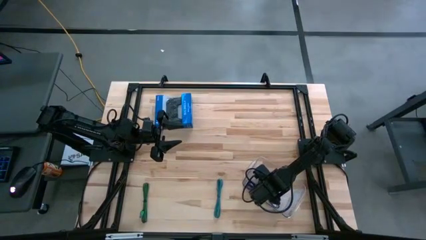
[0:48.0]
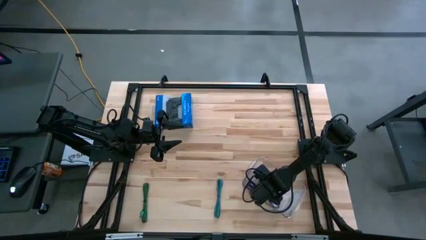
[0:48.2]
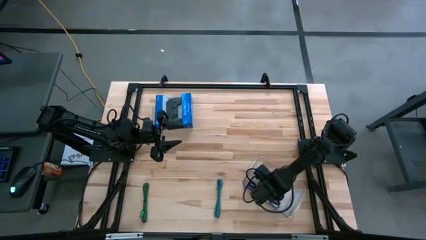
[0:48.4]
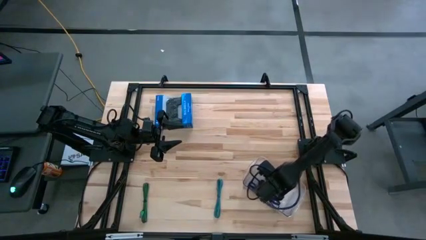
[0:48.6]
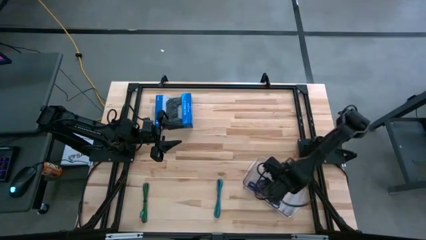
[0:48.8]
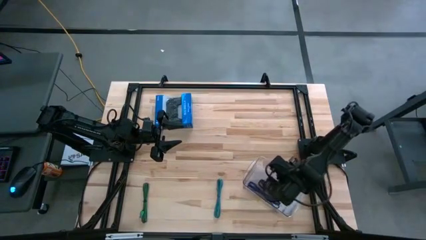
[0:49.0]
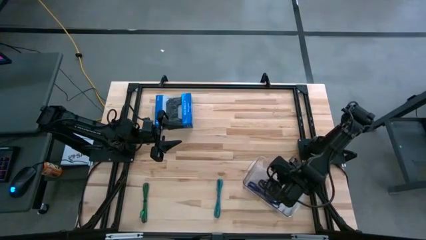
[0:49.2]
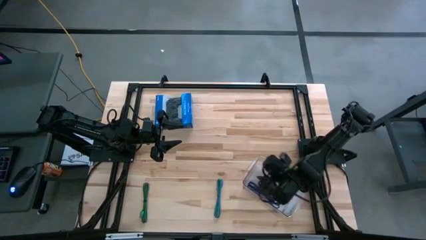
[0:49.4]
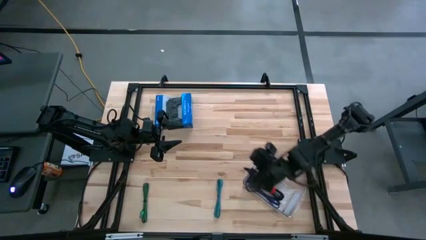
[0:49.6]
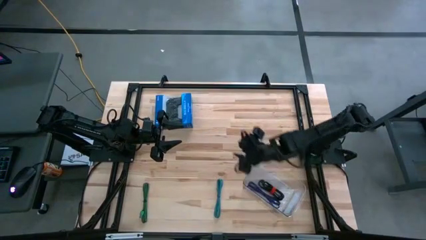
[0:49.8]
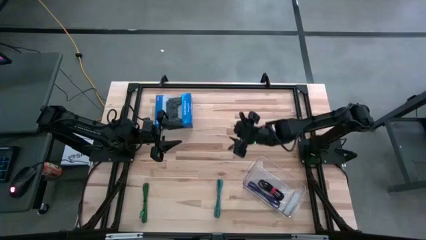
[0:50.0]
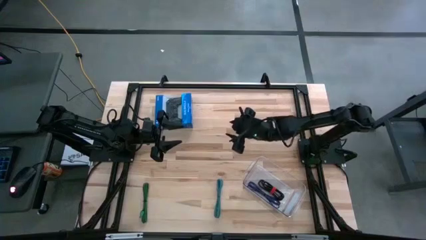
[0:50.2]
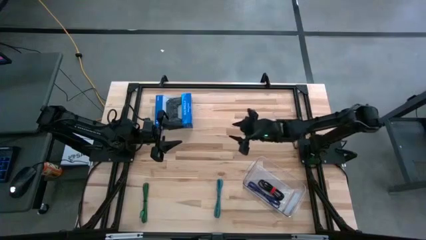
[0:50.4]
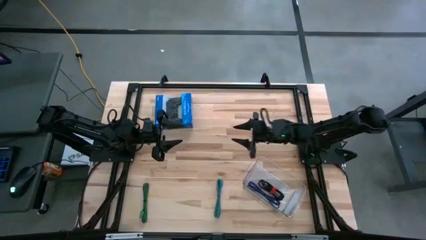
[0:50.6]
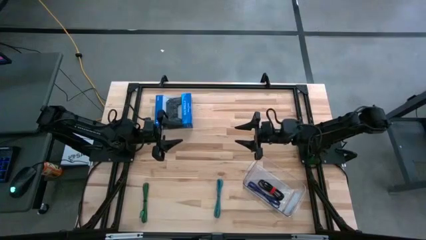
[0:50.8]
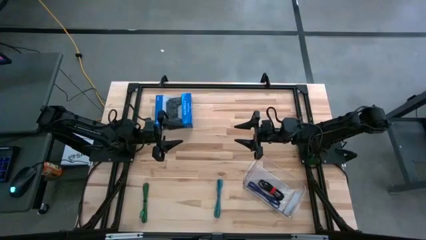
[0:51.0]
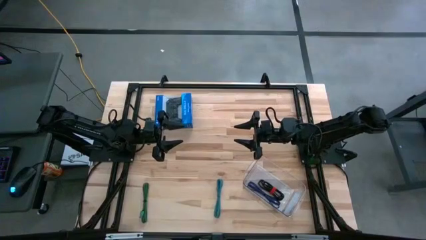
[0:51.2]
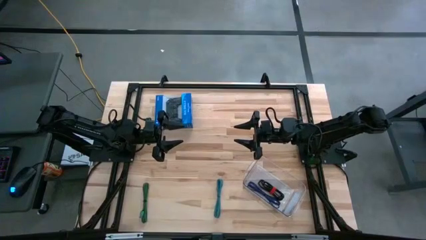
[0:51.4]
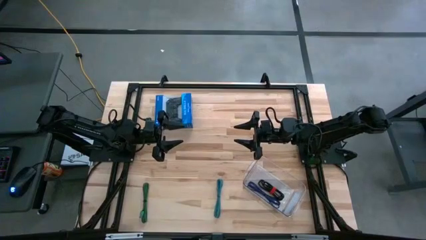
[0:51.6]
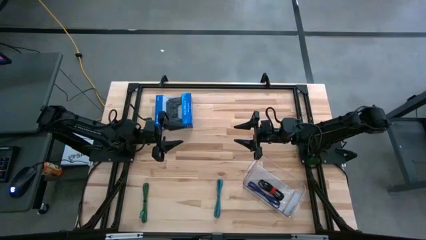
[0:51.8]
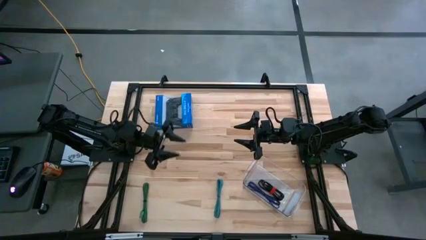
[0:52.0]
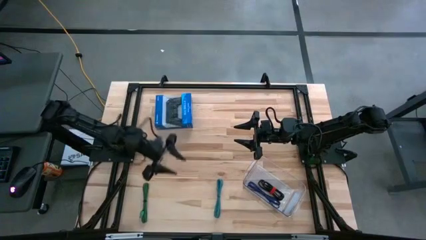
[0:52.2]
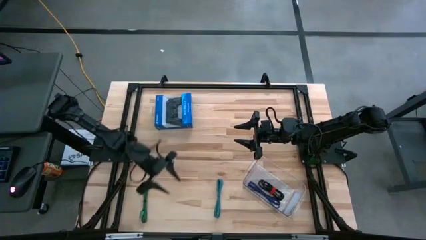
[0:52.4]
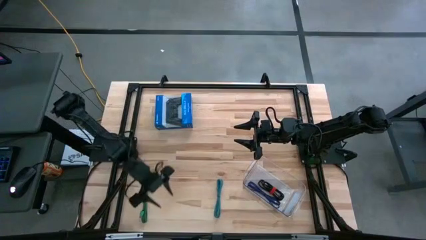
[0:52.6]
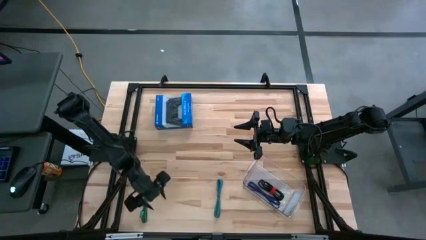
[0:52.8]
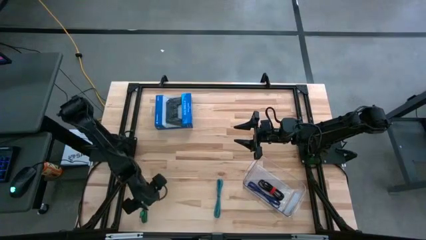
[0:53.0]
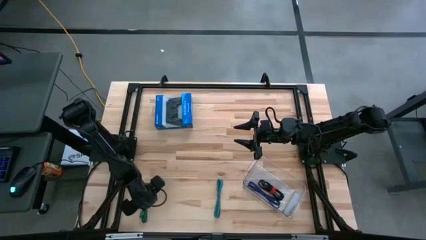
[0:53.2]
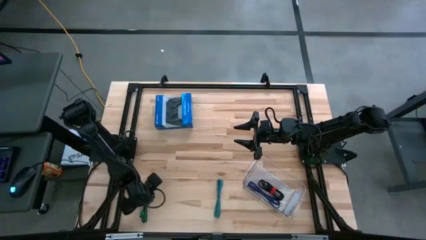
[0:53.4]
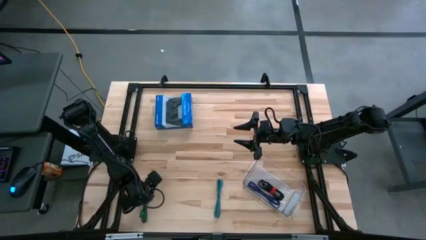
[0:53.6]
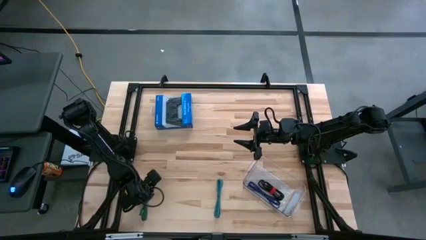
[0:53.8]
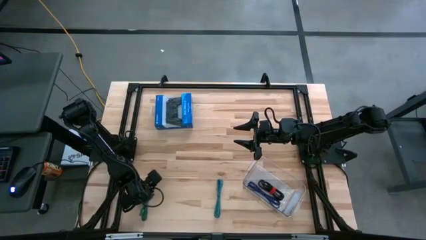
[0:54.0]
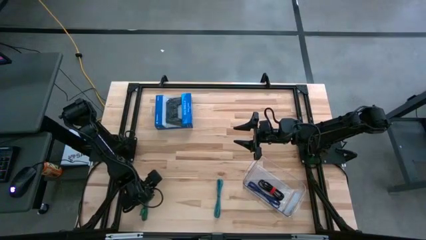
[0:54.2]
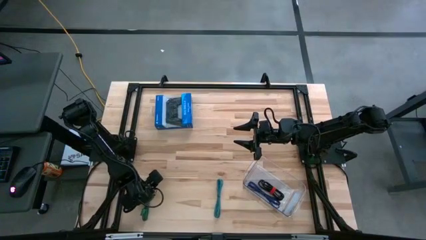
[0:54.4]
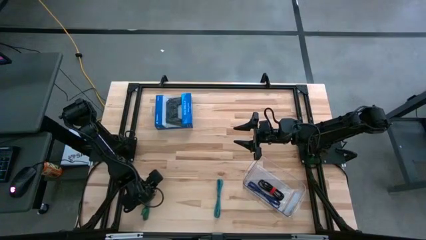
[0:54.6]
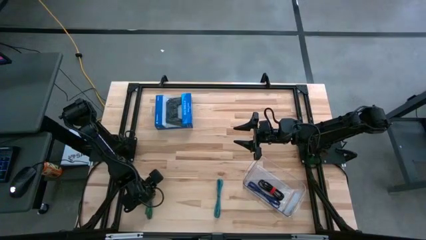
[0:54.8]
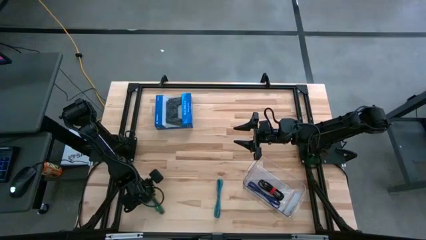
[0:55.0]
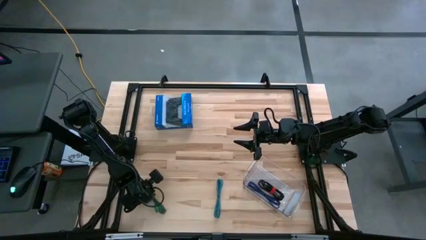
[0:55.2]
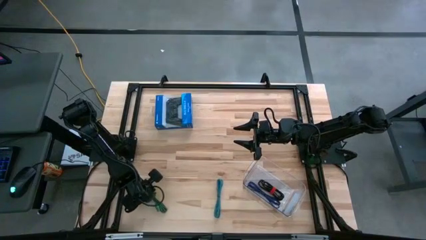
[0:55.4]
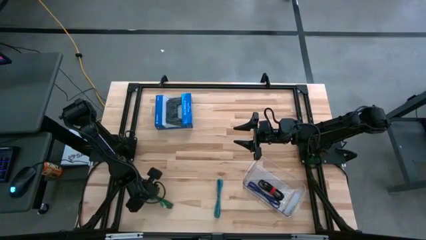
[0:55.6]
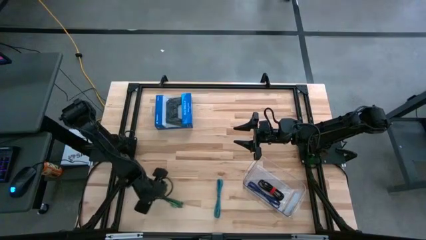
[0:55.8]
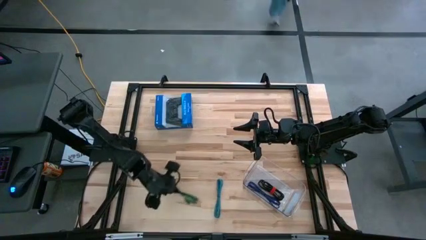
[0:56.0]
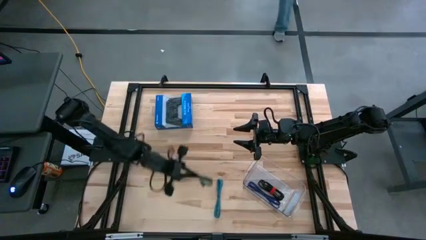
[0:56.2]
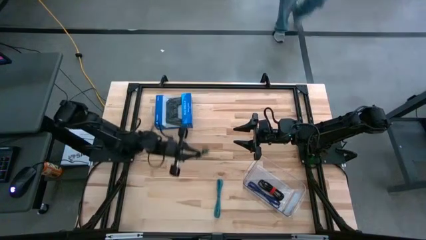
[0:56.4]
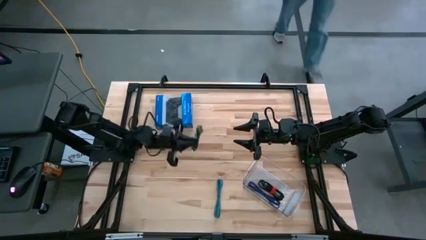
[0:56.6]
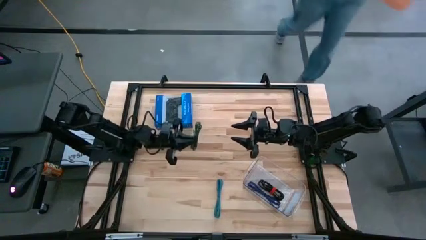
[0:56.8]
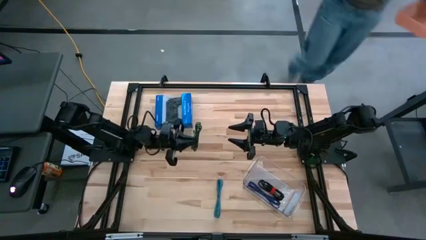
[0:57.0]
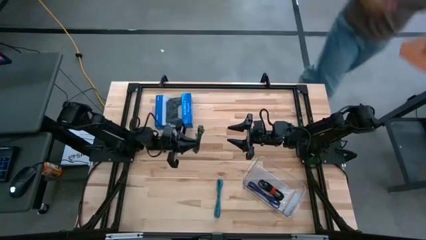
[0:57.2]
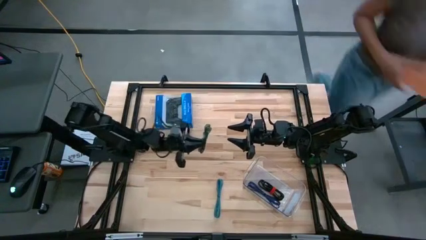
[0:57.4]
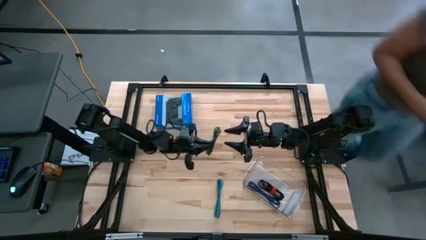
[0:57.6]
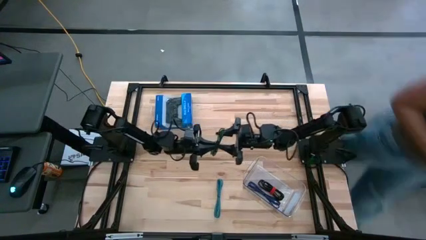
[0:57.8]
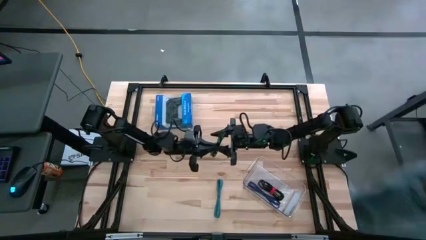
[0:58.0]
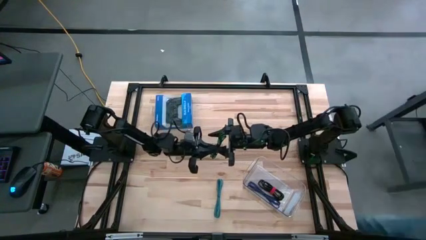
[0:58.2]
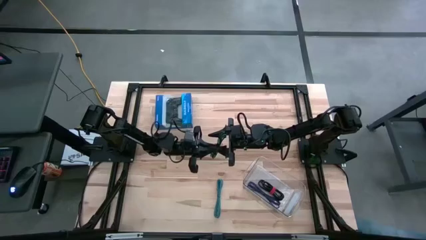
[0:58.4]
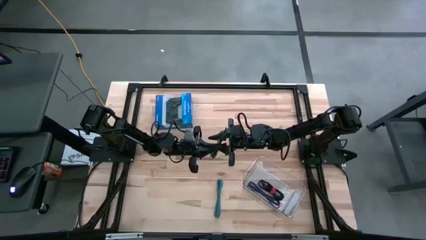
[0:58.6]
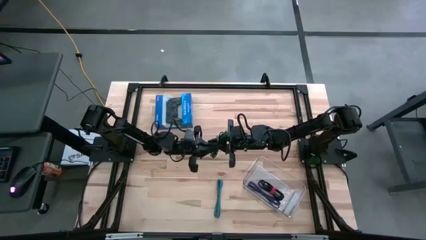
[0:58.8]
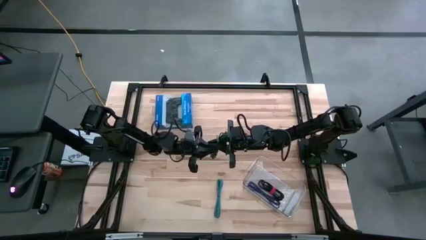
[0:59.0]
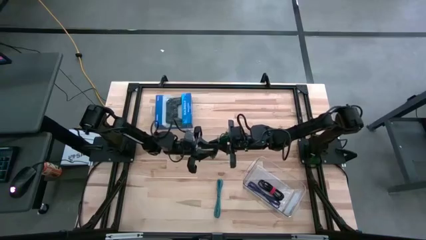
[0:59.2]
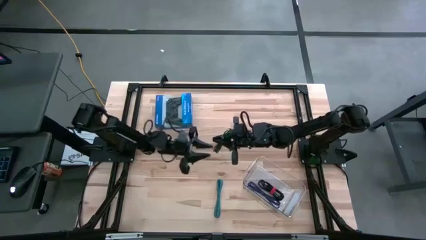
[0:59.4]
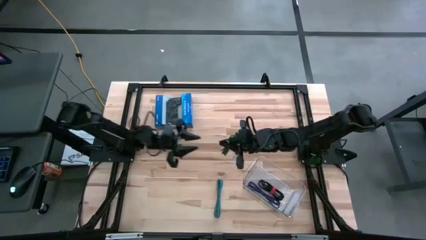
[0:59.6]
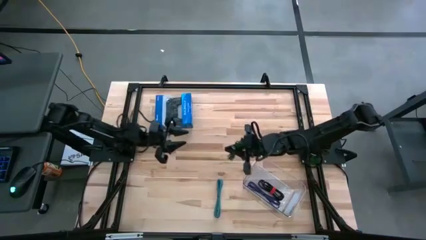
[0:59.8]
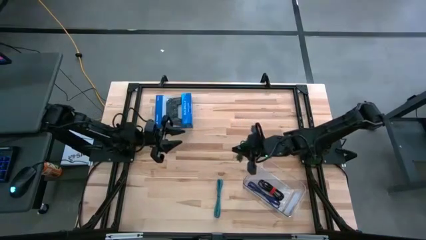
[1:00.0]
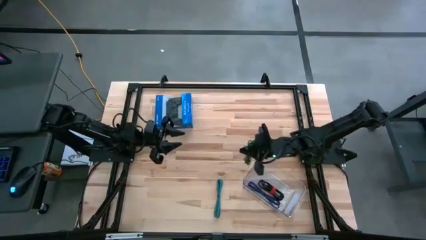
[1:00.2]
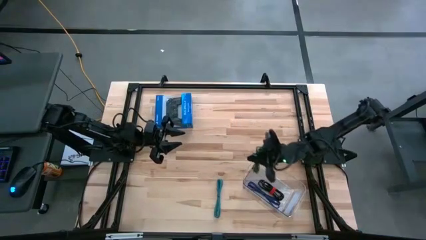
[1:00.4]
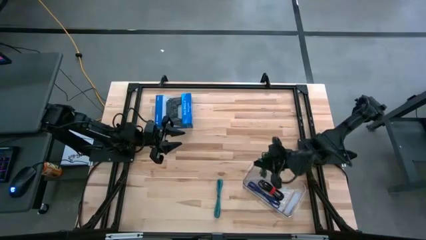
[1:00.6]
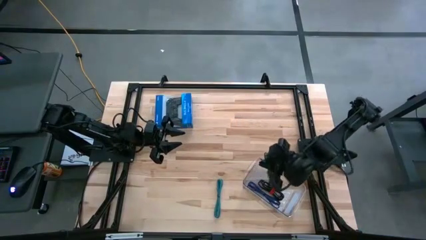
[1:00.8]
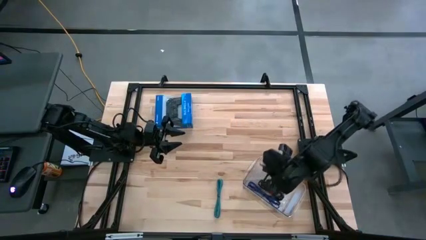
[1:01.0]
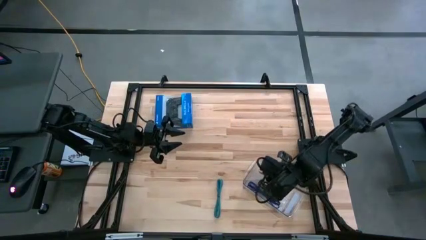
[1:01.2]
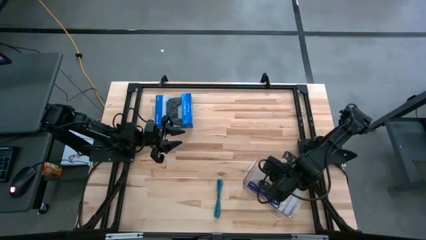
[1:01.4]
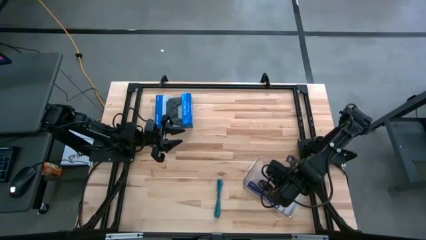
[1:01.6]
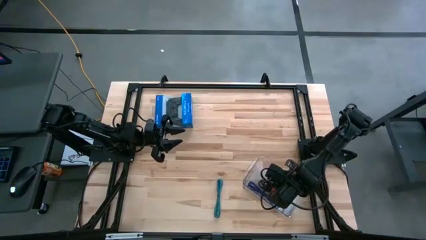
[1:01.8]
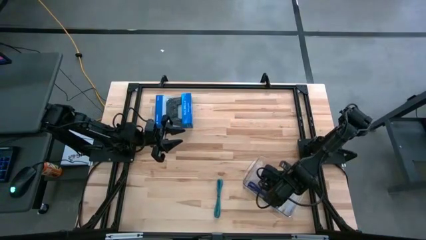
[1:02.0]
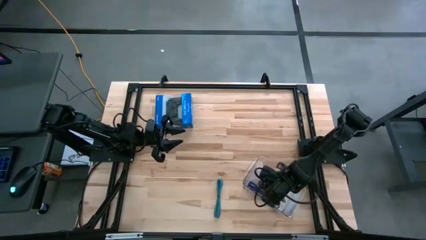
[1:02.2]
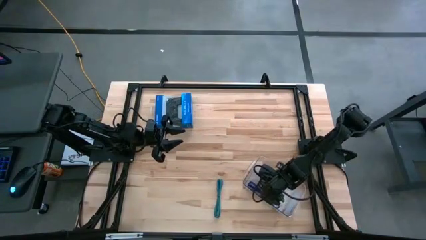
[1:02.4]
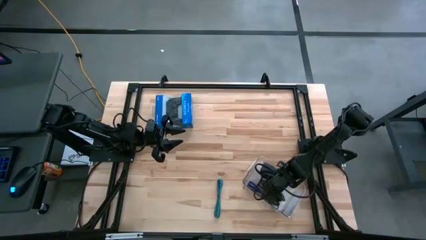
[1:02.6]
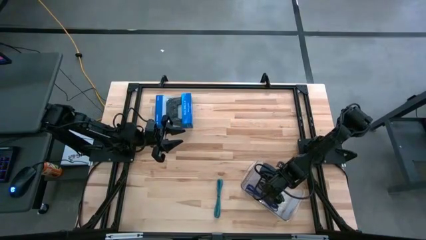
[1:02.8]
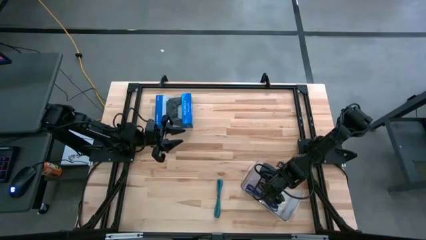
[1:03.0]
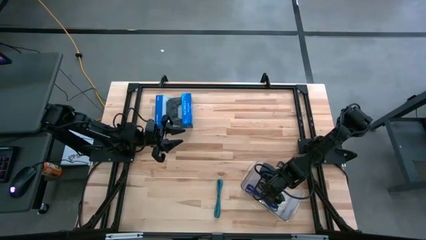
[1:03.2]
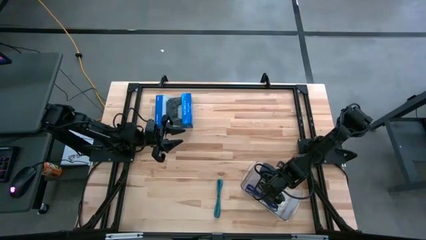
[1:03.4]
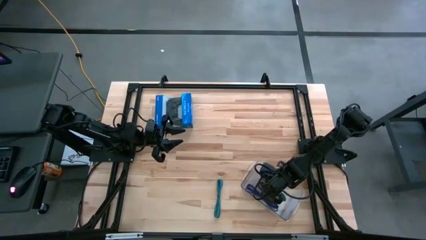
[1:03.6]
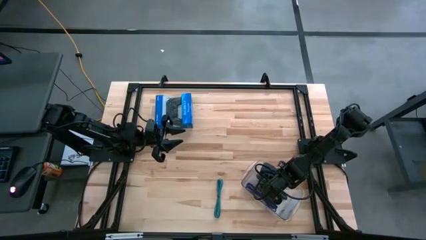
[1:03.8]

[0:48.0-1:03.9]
Task: Pick and place USB-C Cables
Put the green charger cable into the transparent bin
